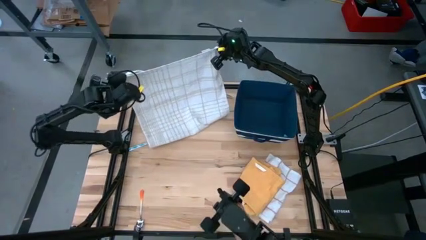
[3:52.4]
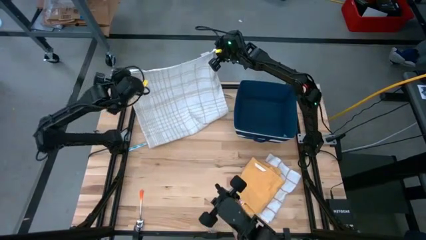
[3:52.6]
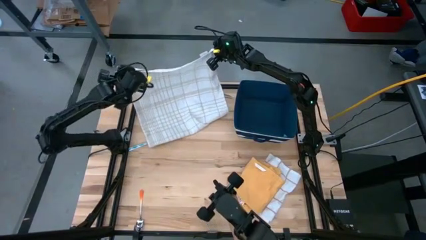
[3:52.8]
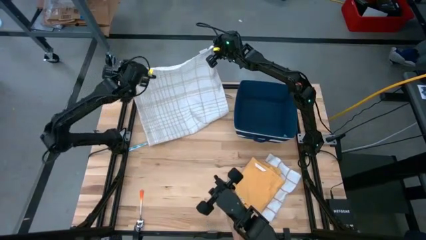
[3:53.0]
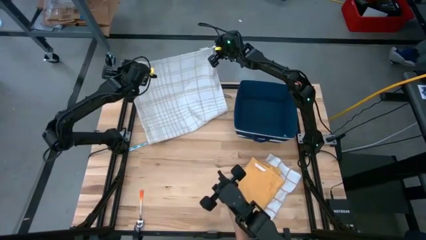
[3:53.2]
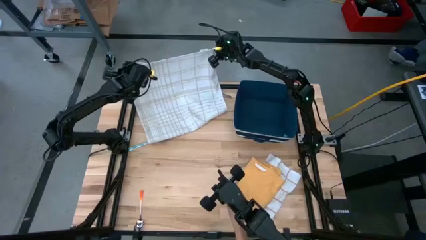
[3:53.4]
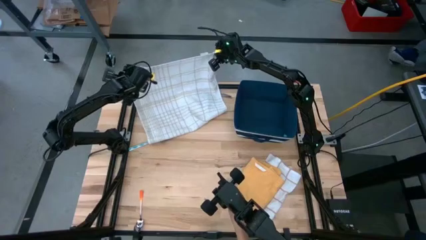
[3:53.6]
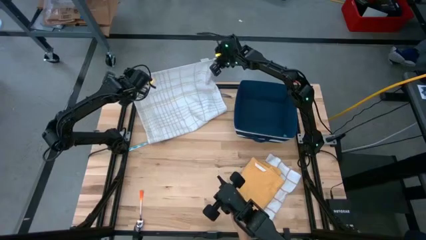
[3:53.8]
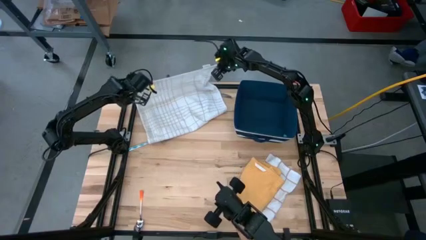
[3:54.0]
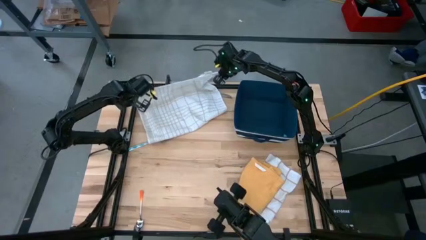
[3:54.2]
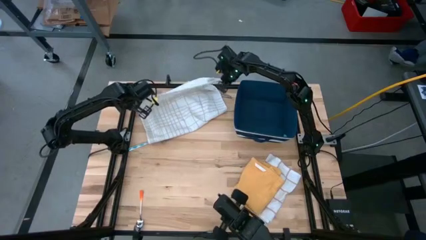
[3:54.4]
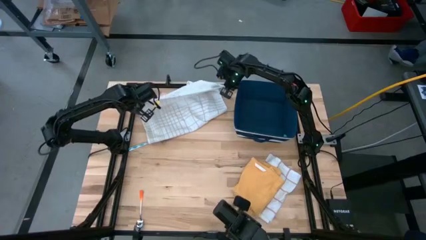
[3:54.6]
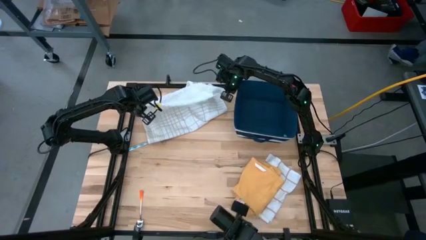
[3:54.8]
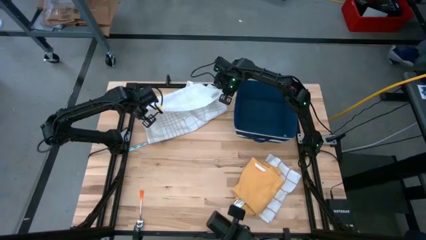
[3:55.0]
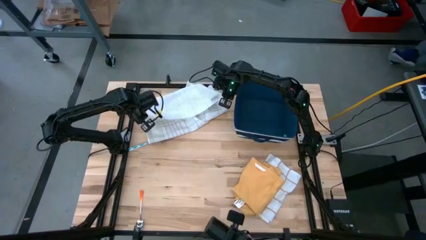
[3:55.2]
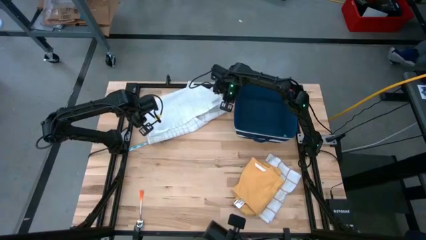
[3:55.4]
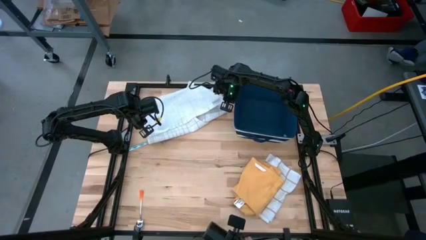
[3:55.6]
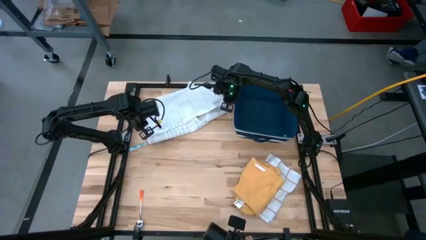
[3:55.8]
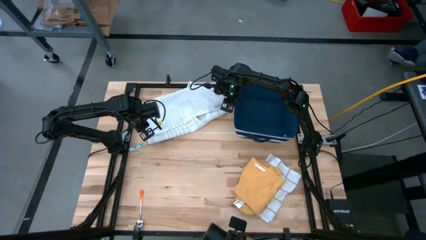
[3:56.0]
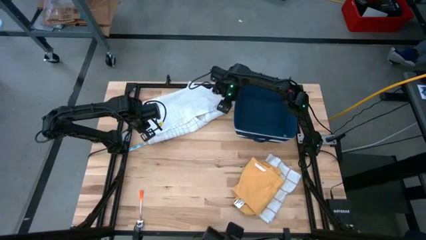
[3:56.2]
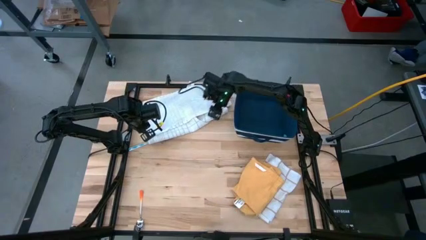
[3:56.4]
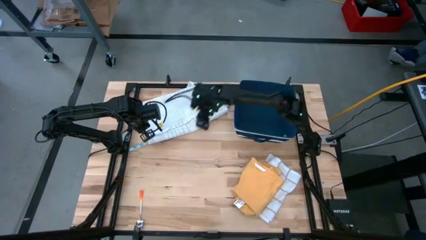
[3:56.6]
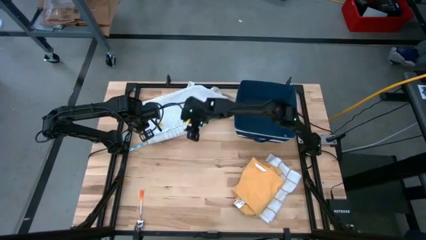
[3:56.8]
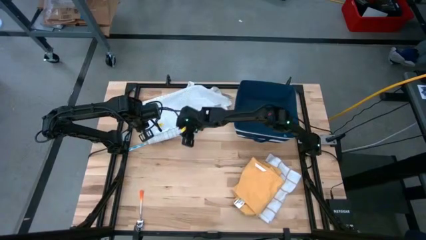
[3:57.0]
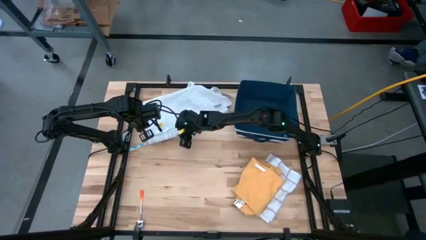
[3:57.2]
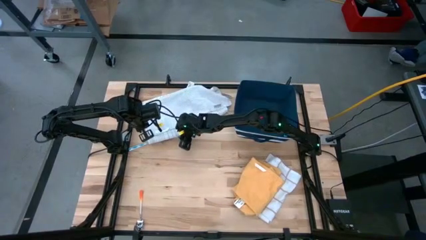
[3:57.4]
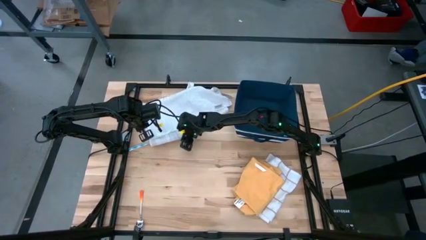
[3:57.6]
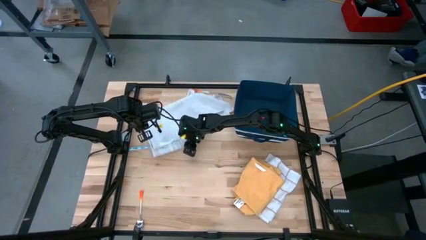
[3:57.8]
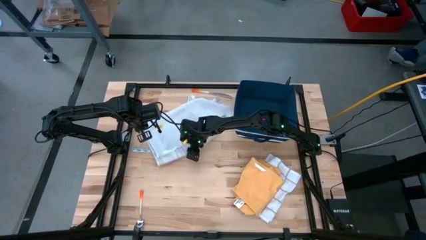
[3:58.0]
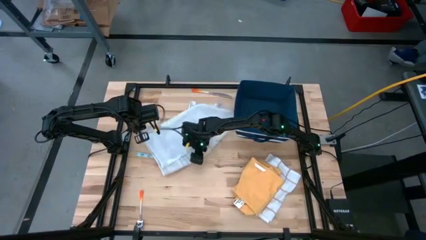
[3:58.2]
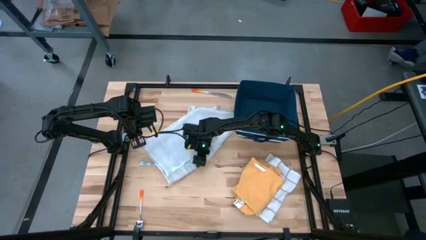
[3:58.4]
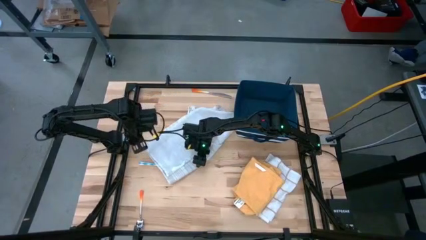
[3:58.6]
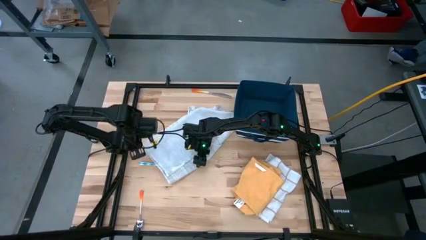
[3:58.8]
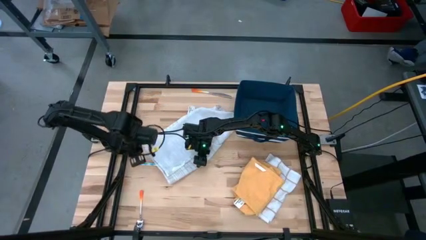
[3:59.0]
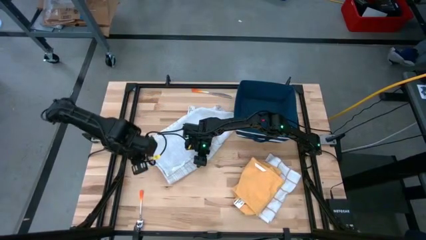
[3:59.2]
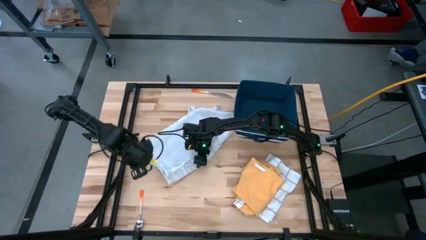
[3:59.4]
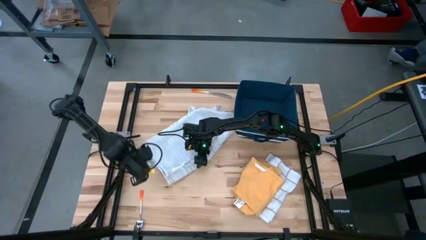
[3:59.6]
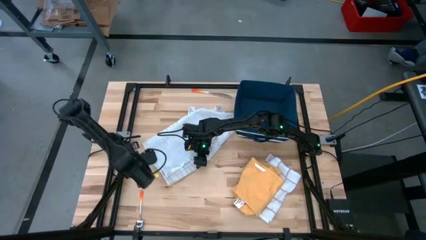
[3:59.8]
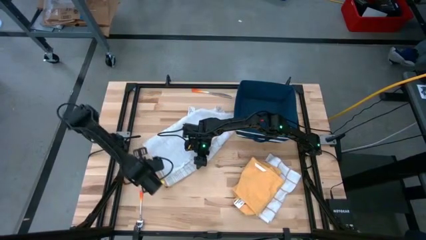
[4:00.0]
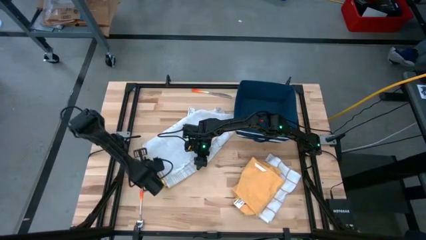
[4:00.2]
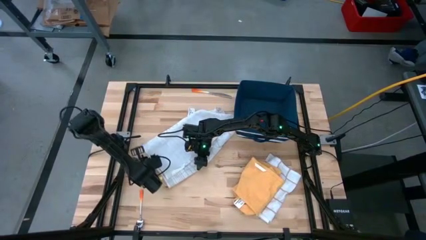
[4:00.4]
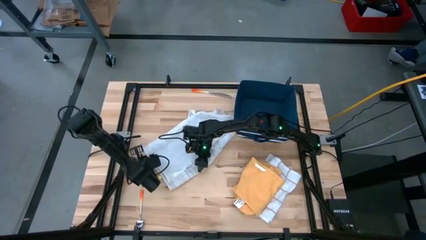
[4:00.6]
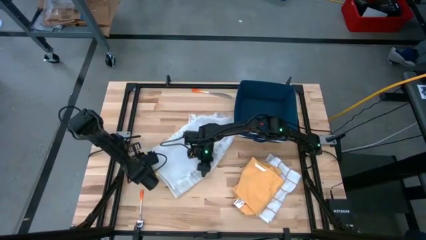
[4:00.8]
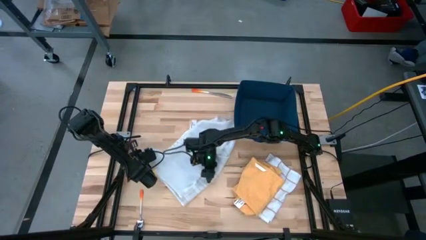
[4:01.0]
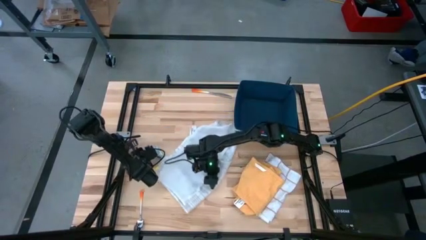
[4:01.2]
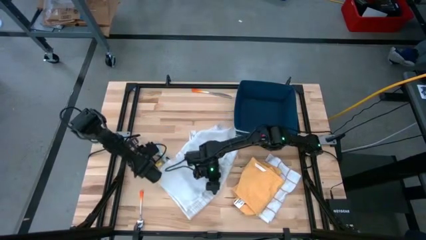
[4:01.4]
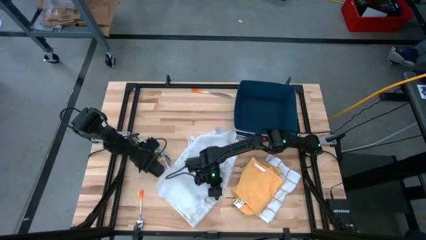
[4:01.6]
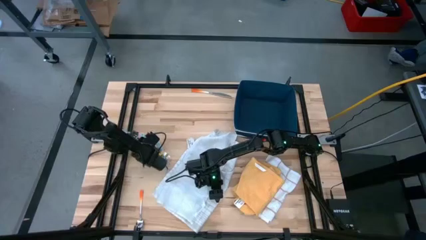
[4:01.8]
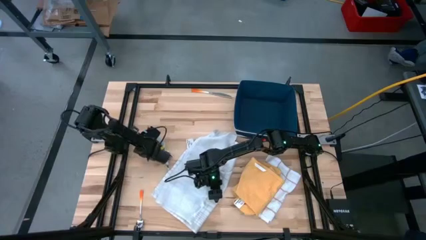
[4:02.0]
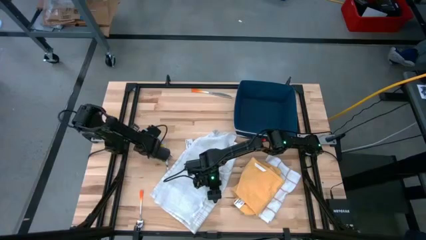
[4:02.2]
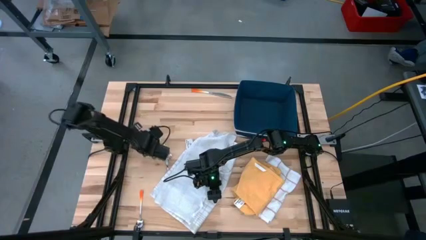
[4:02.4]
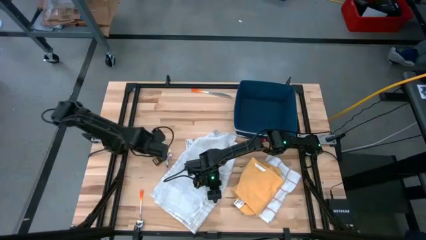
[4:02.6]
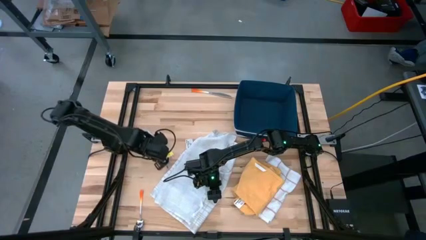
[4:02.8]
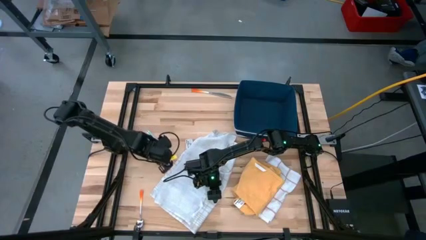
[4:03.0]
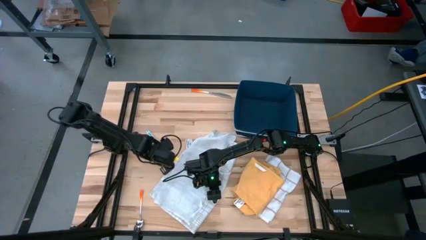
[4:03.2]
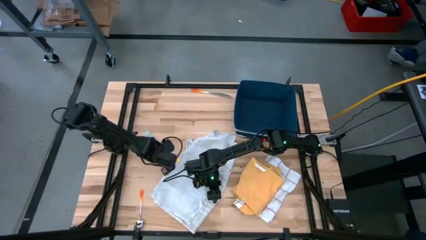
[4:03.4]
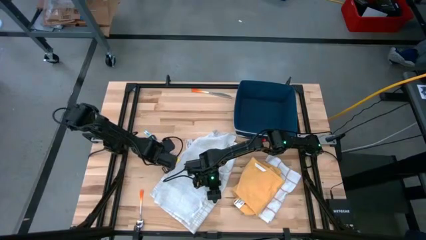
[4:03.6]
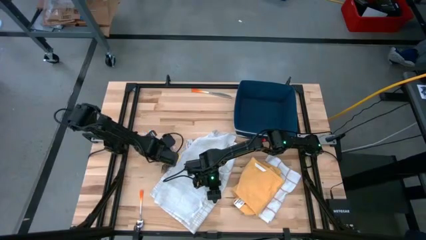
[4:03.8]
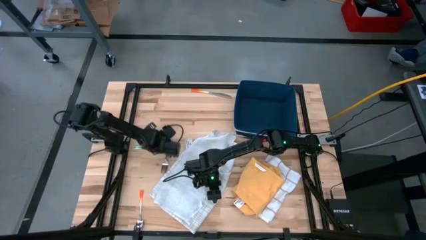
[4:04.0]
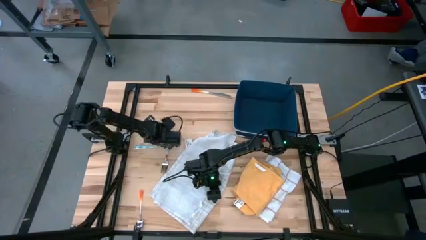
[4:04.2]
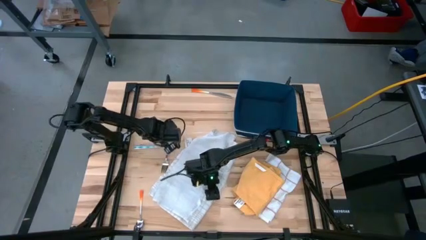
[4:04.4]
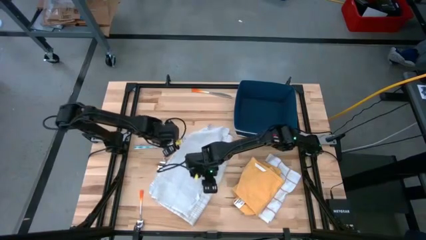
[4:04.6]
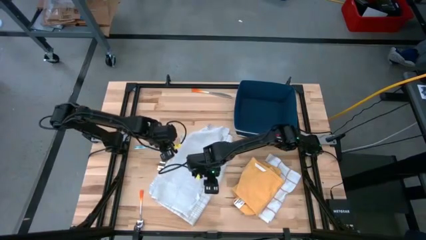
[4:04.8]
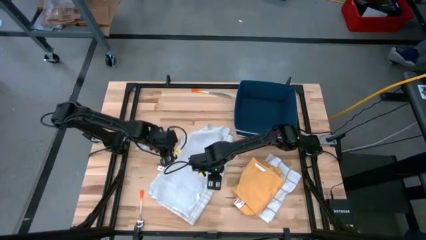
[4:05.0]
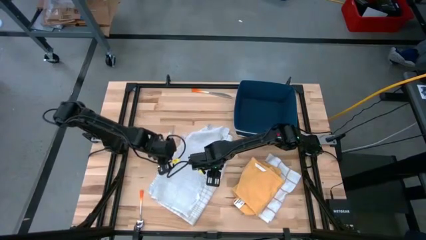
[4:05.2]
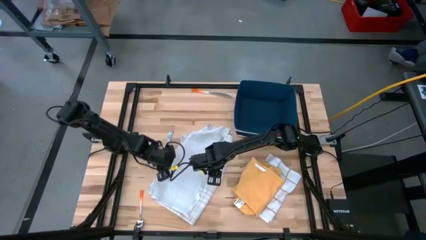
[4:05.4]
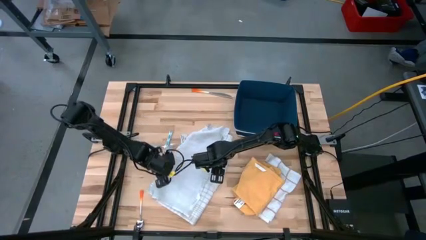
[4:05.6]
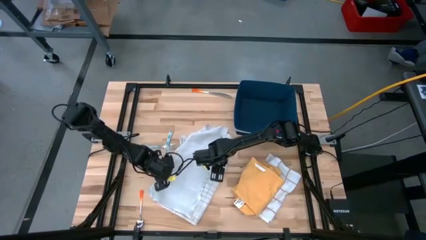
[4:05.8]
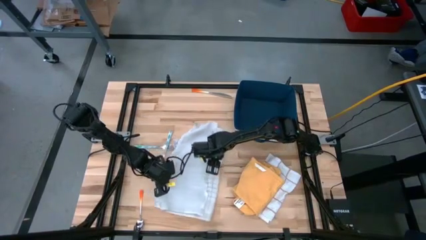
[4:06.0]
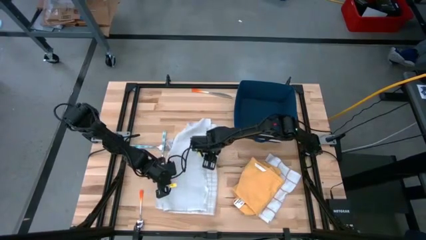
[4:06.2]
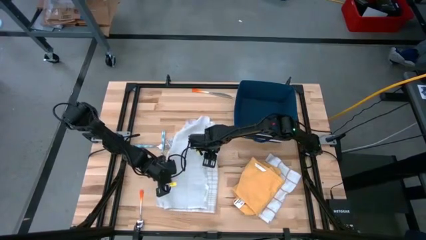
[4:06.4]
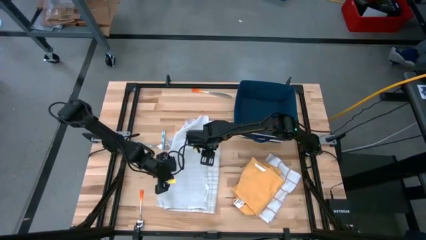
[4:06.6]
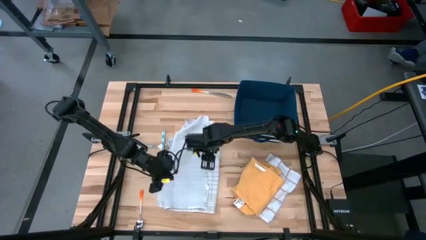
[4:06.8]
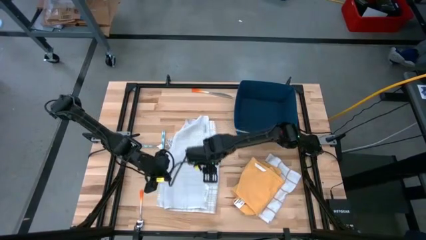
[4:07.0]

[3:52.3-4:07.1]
Task: Fold towel
Fold the white-and-gray checkered towel

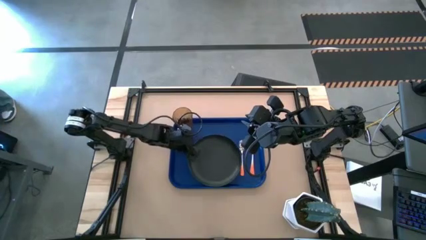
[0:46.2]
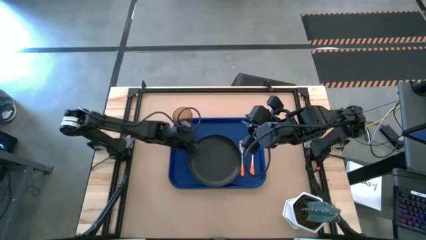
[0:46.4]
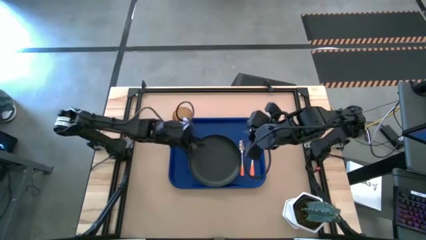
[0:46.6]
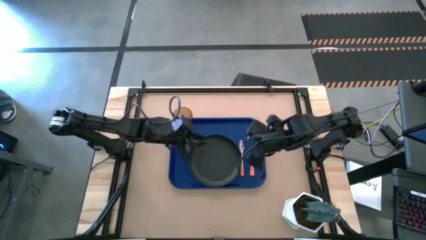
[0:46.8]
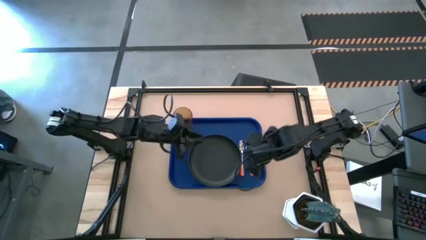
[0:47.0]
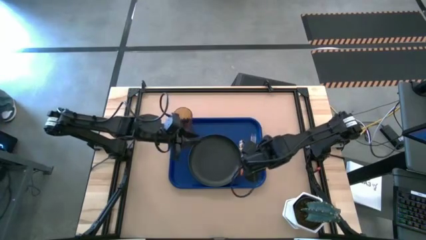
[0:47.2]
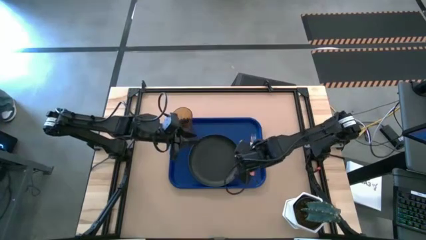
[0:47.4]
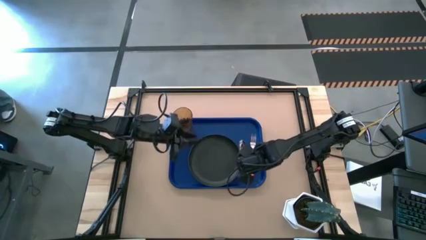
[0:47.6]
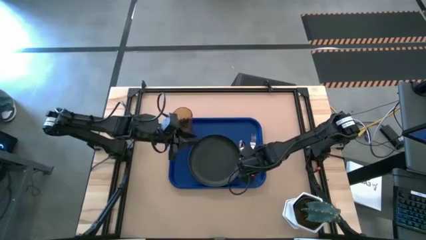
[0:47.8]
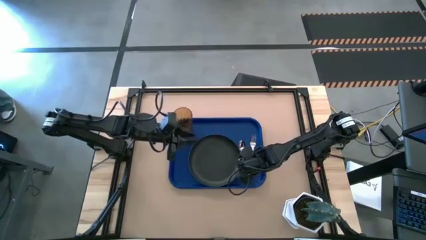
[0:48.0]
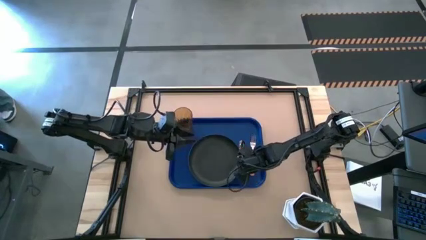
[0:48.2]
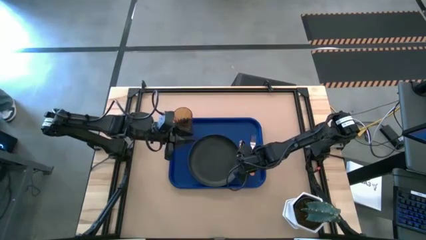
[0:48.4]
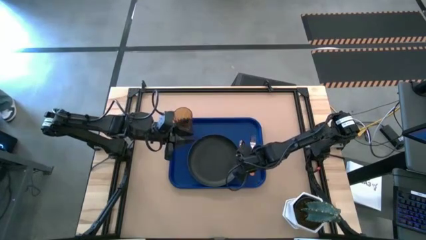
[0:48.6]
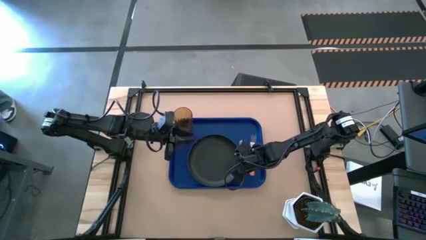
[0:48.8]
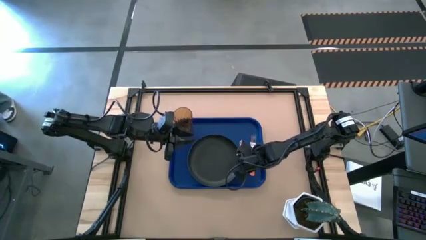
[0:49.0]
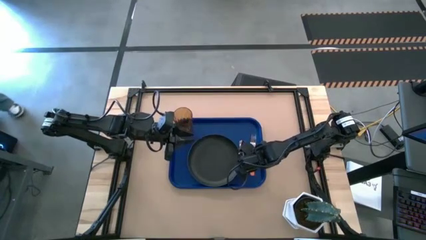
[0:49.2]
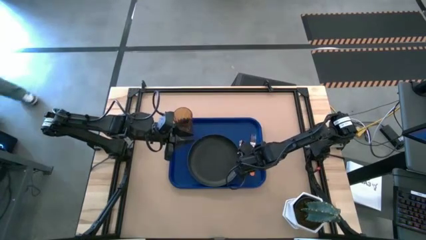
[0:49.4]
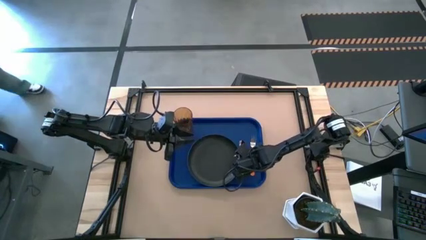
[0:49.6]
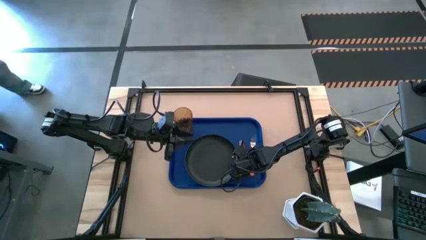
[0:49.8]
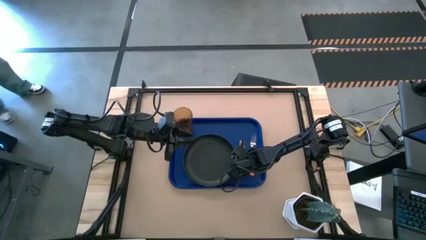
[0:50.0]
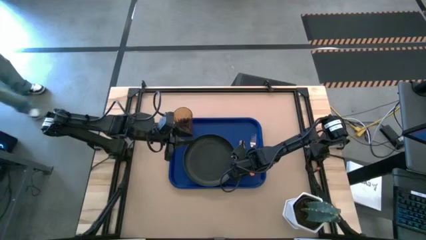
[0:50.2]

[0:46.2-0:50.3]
Task: Pick and place plate/cup/fork/spoon on tray
Adjust the black plate on the blue tray
